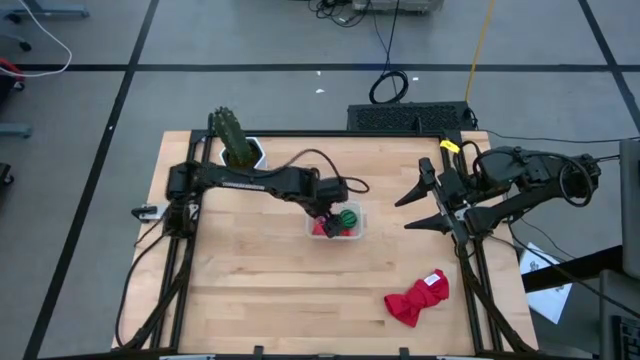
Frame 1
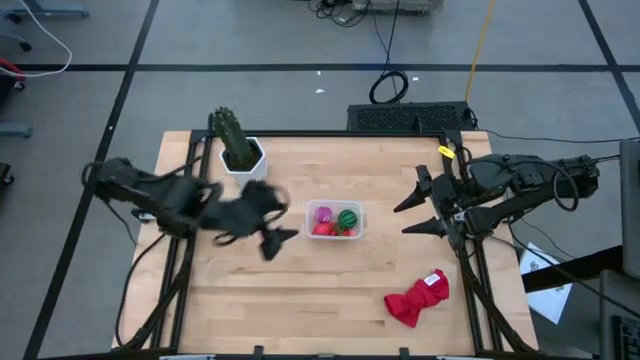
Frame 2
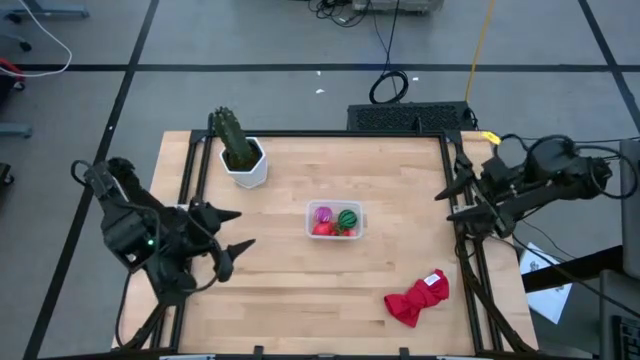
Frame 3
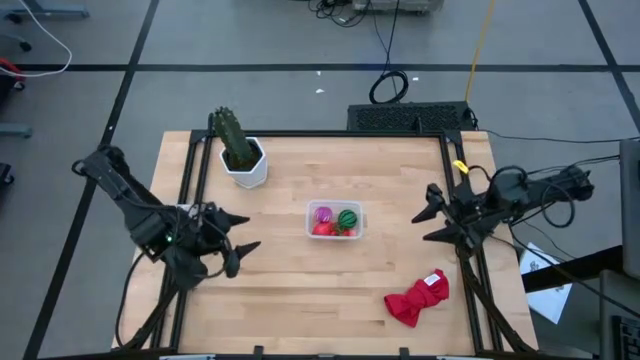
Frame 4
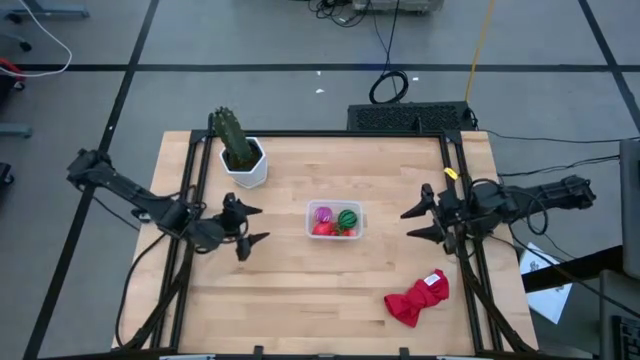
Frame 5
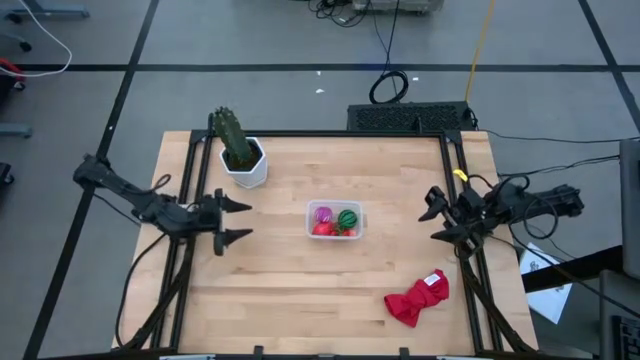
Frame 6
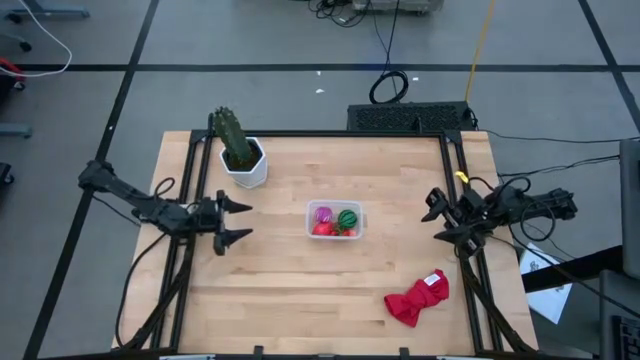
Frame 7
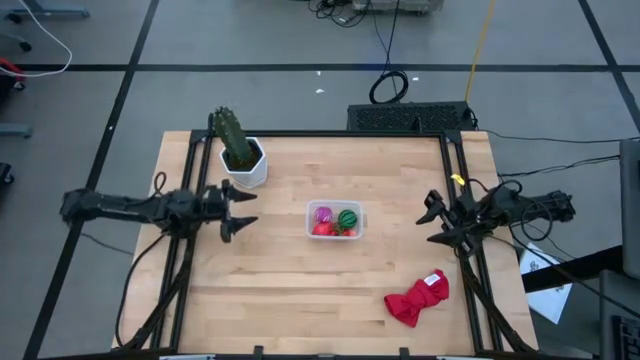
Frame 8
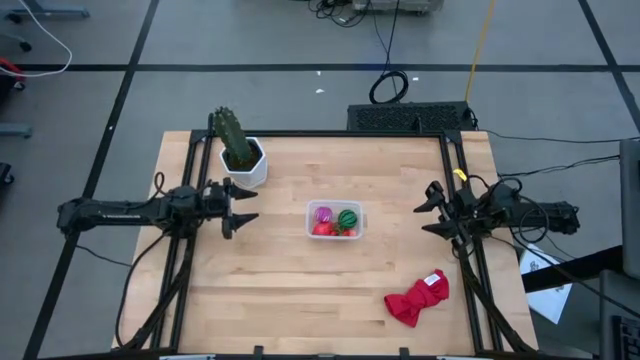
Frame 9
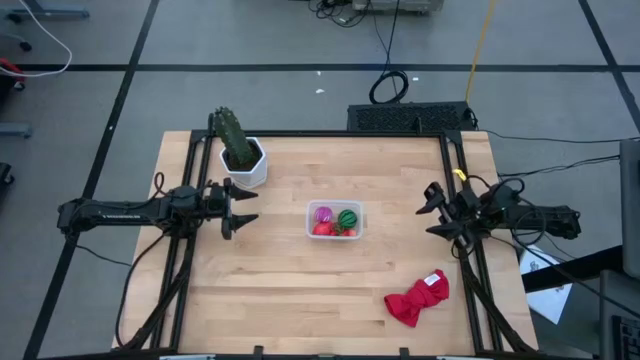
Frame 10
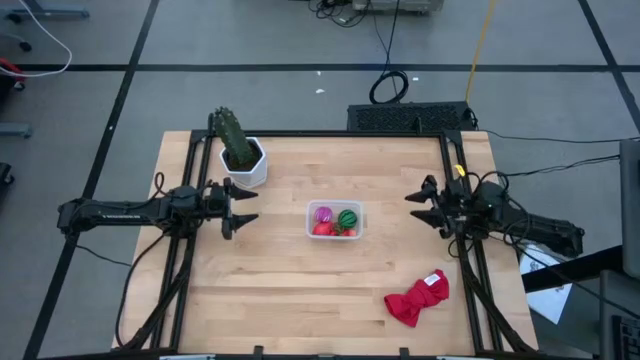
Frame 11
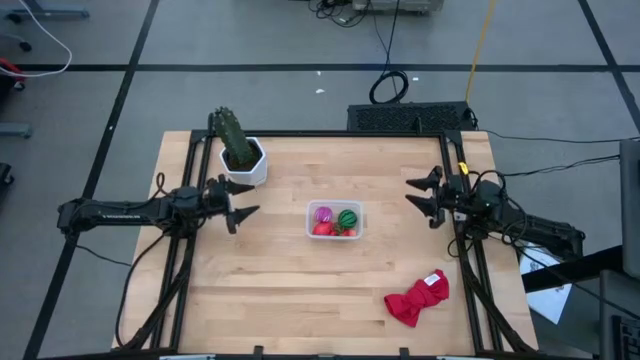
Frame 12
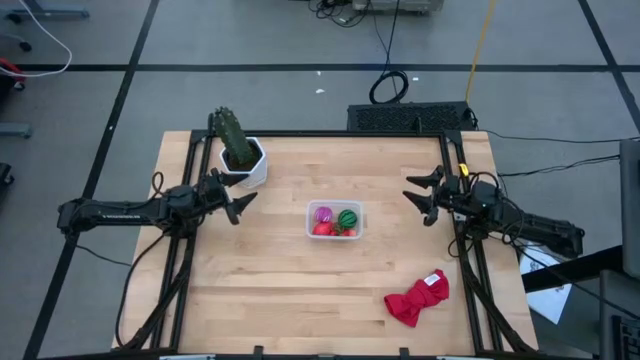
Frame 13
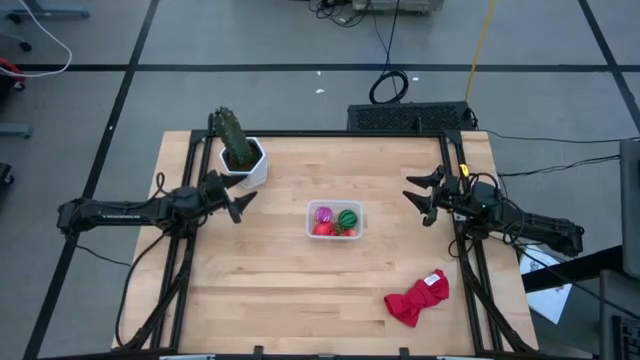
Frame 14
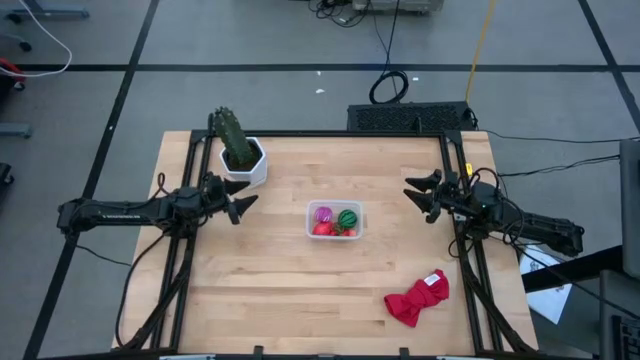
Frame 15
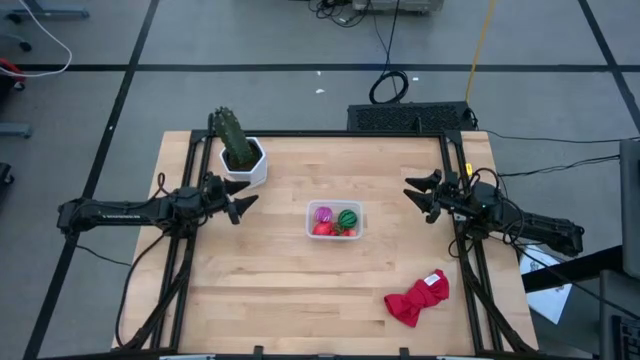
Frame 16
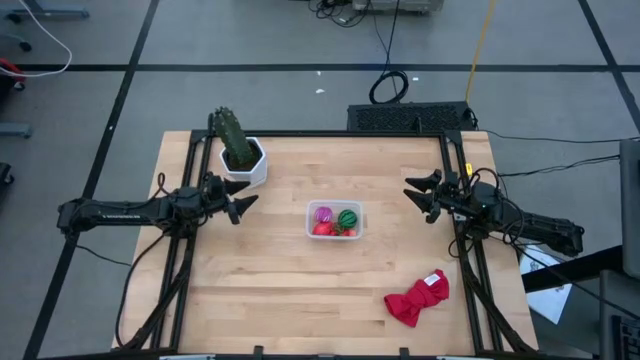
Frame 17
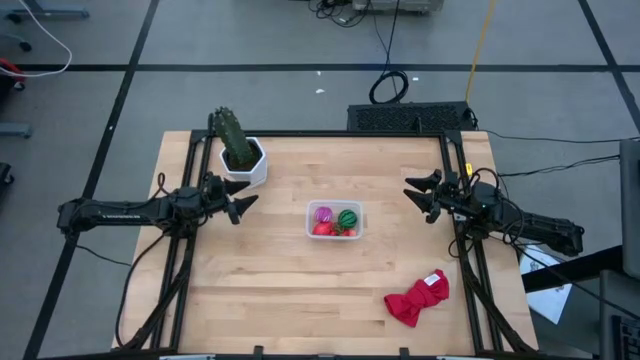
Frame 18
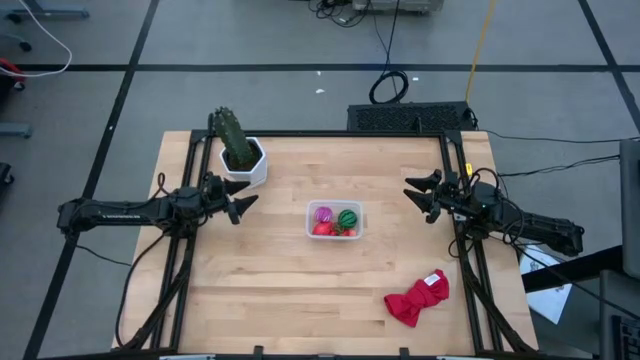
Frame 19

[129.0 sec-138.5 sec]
Task: Pick and placing Produce into tupperware
Return to Home Position

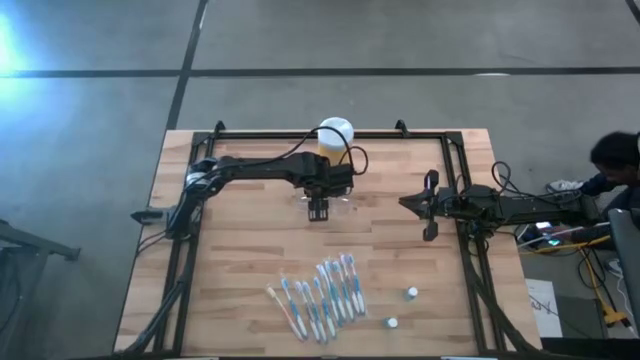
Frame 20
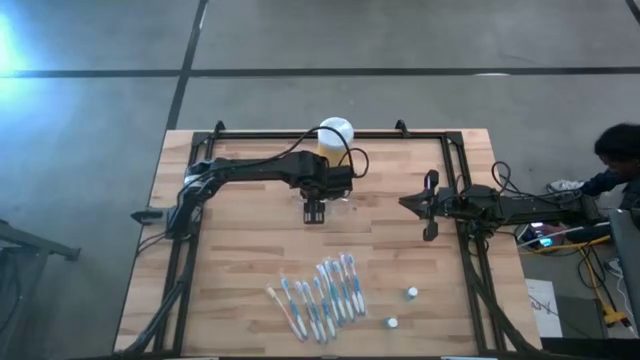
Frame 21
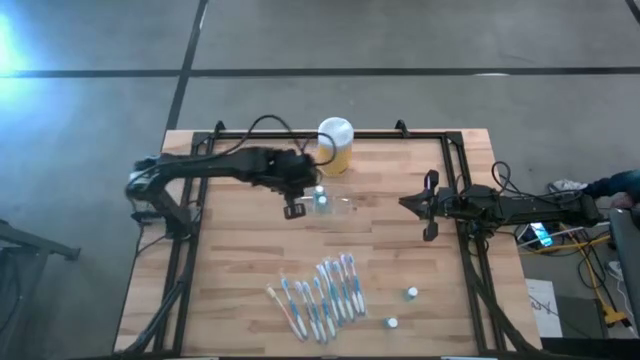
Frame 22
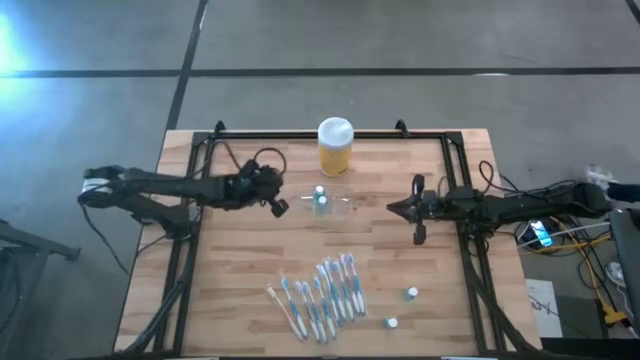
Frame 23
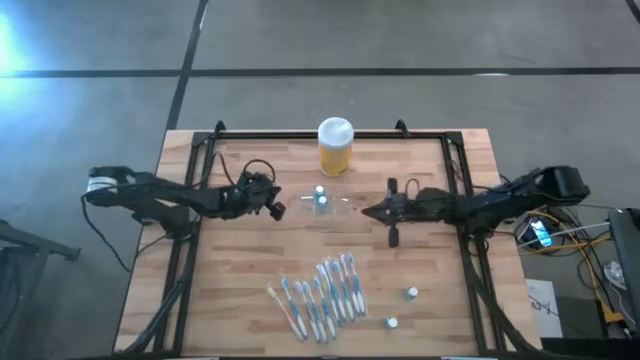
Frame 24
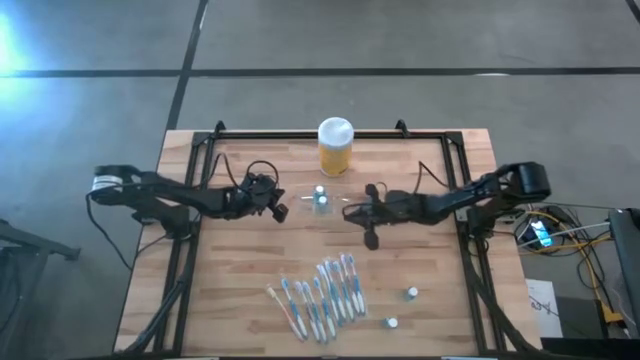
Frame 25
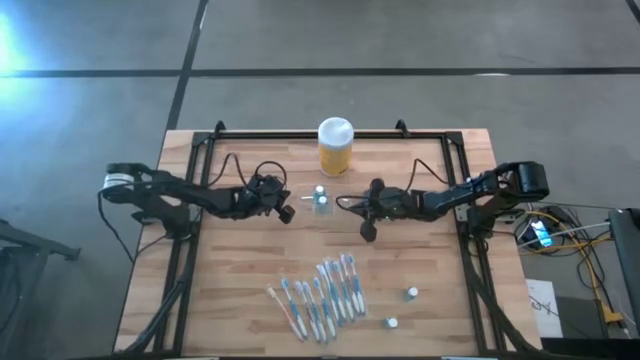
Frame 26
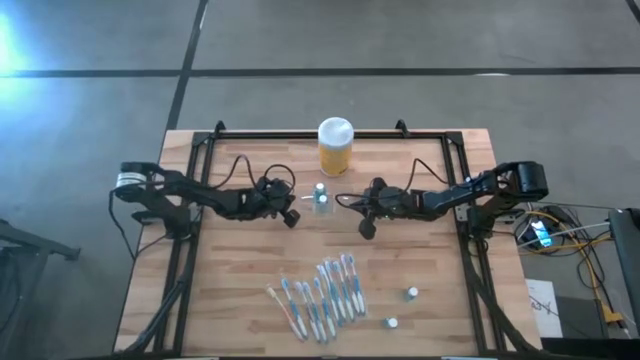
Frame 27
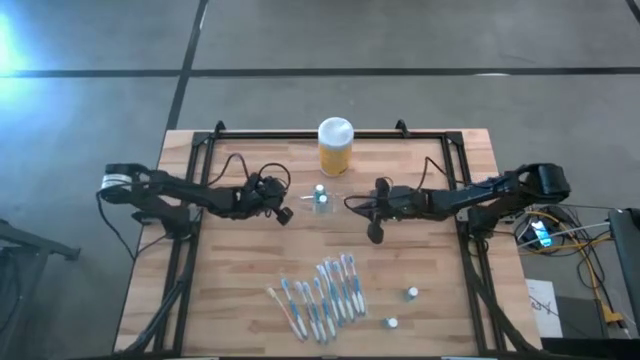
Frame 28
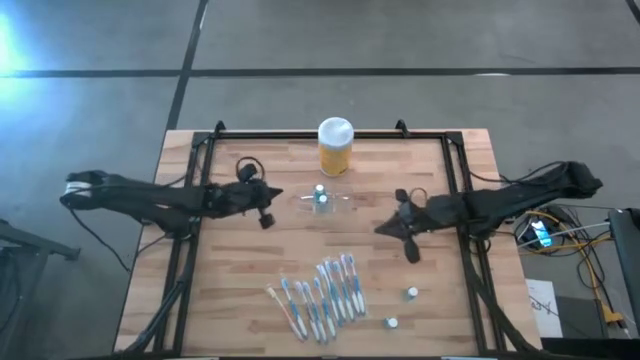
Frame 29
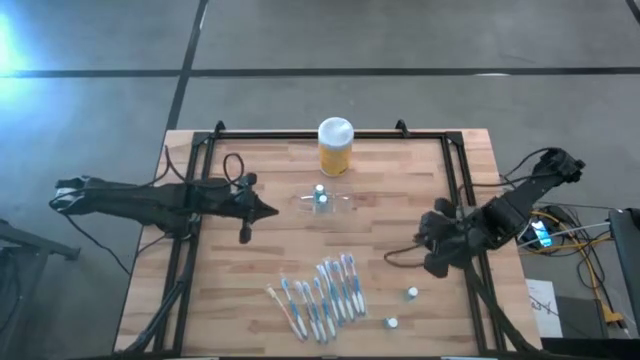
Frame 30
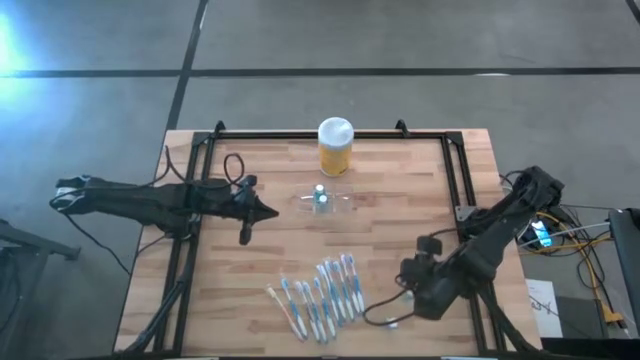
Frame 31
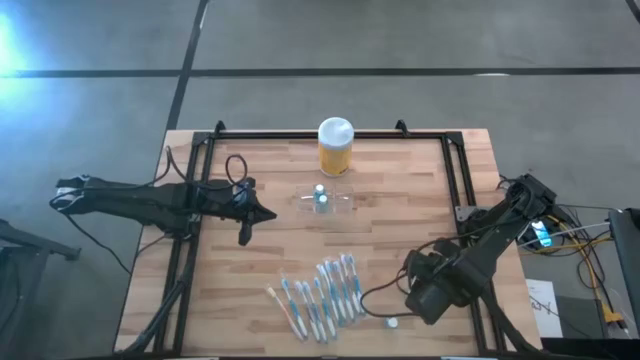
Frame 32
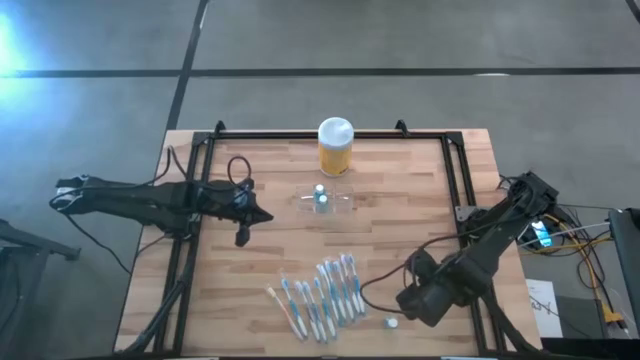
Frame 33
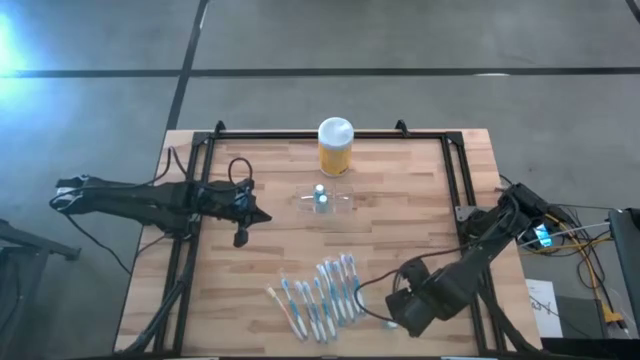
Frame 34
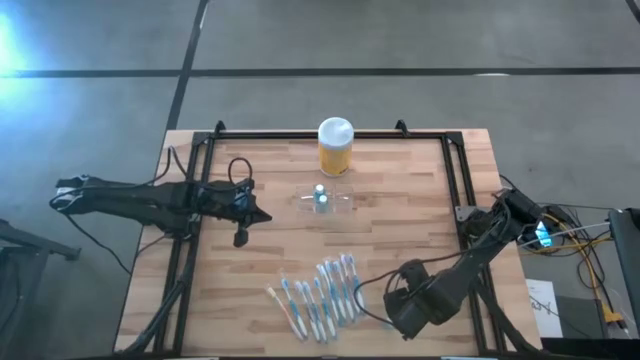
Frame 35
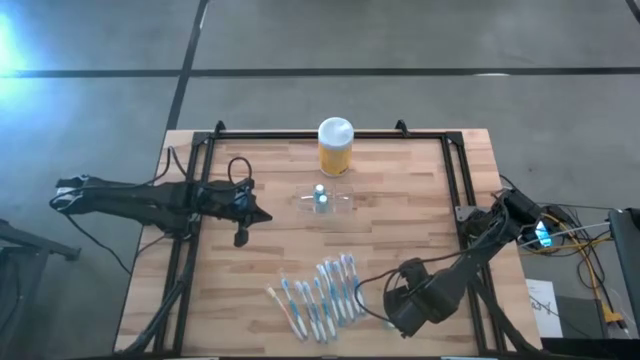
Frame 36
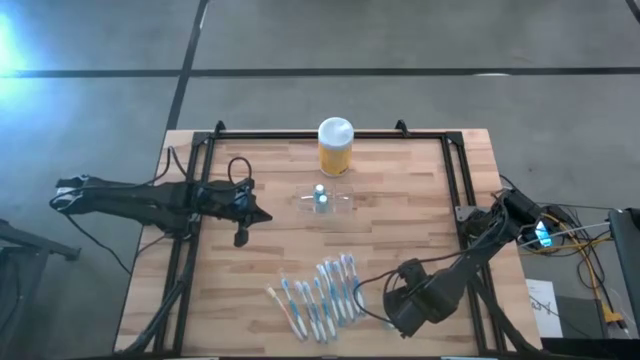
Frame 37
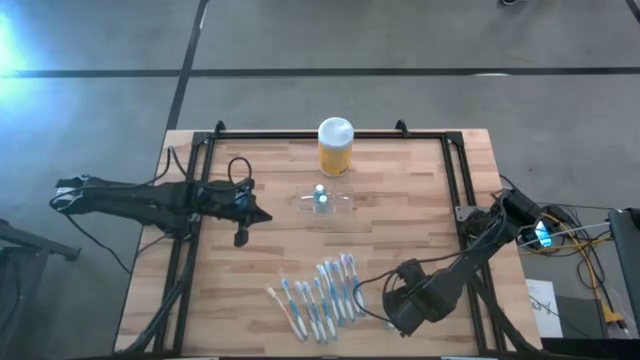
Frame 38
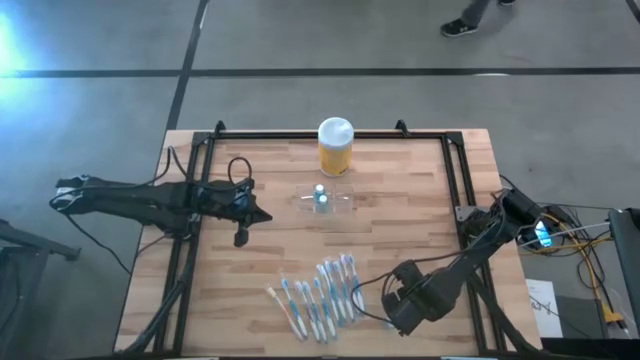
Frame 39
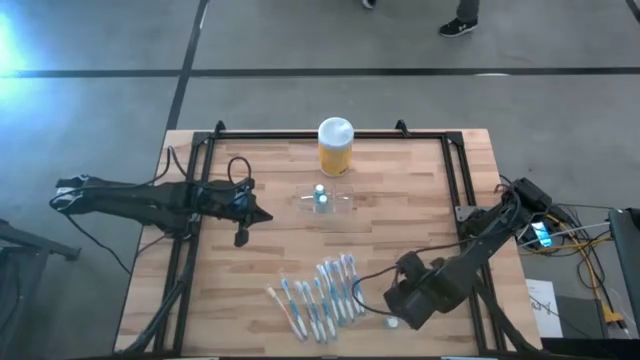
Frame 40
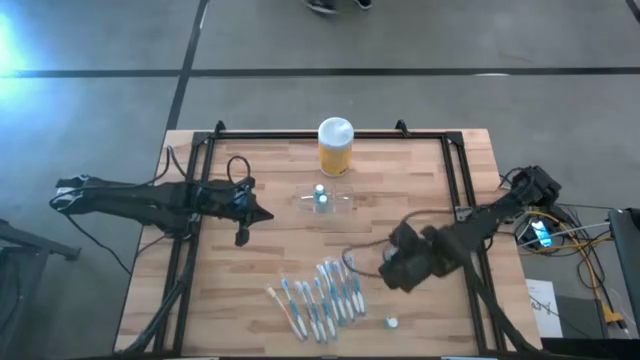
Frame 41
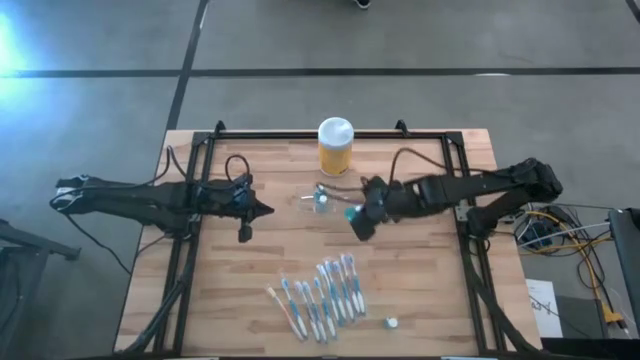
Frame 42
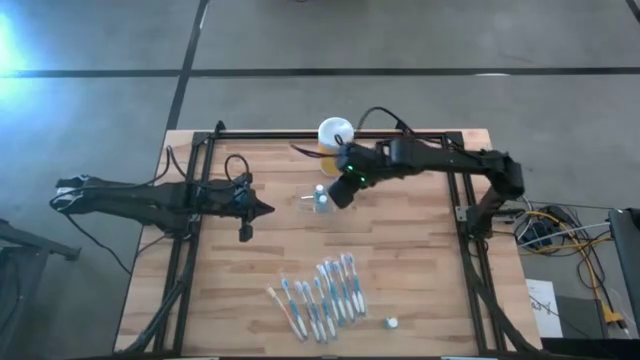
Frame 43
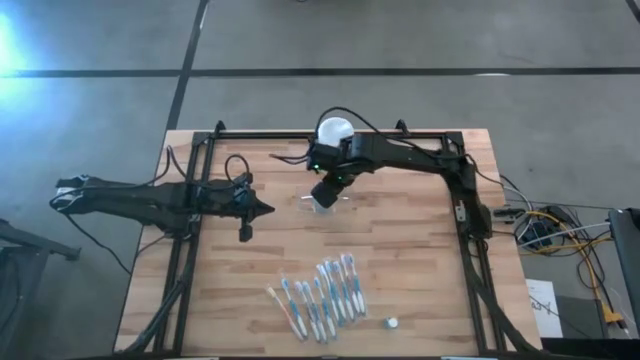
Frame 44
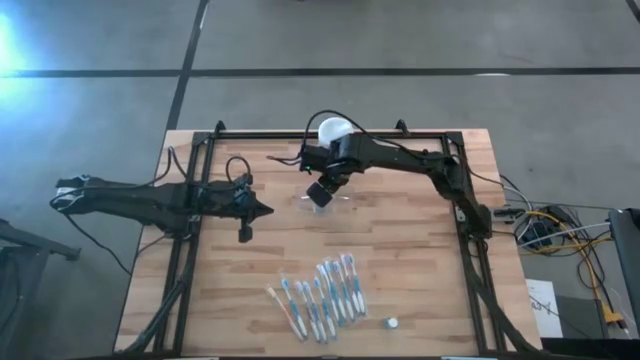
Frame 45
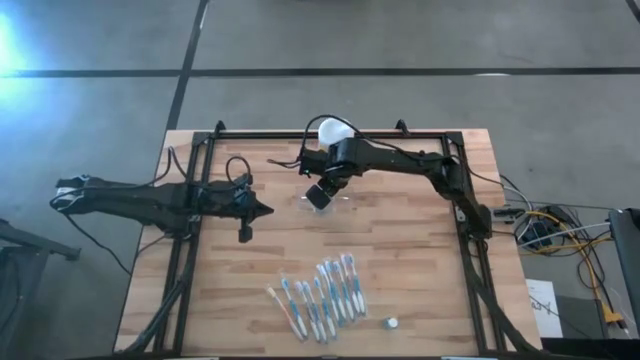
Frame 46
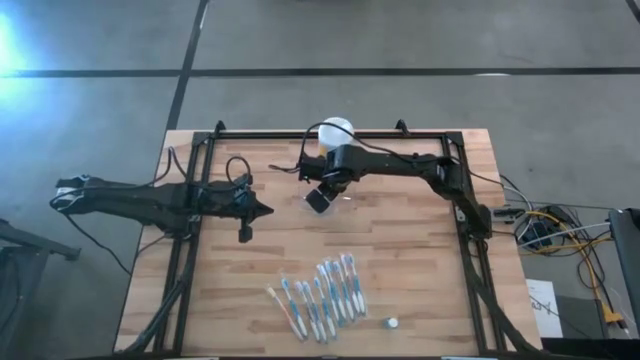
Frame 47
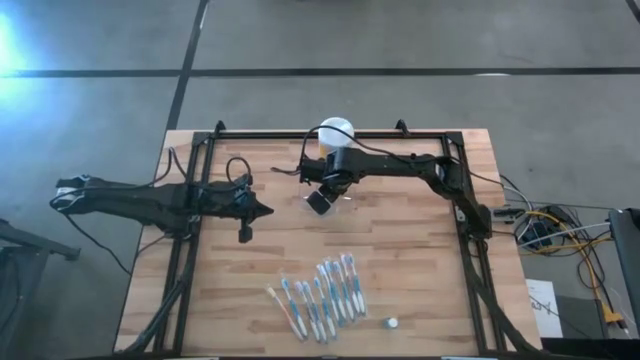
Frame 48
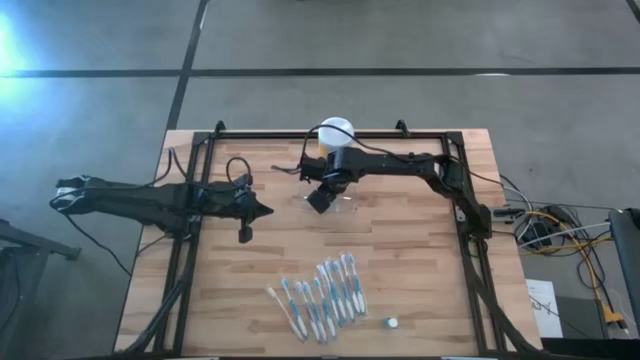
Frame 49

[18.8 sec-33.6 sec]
Task: Pick & Place toothbrushing station
Put the blue mouthwash bottle into the transparent organizer
